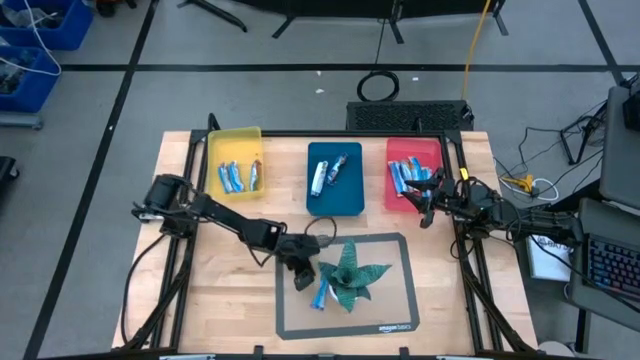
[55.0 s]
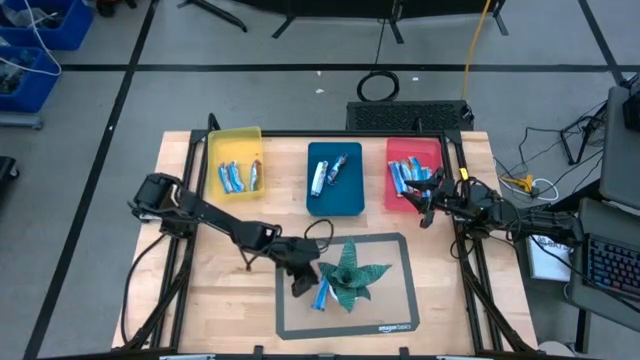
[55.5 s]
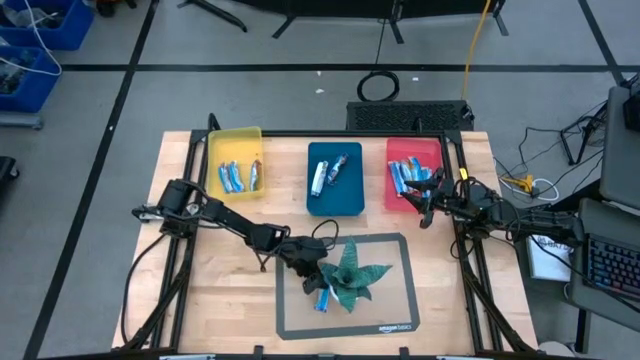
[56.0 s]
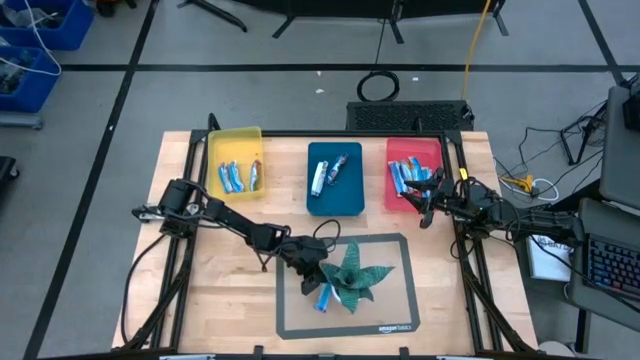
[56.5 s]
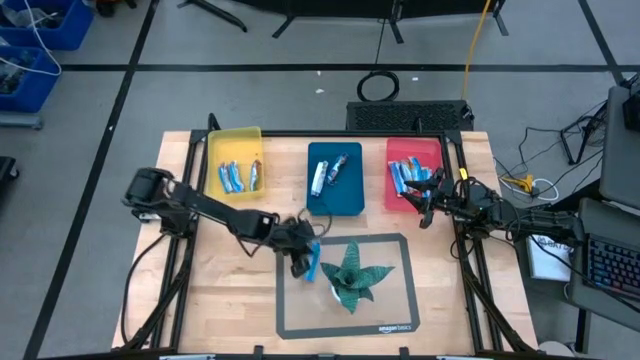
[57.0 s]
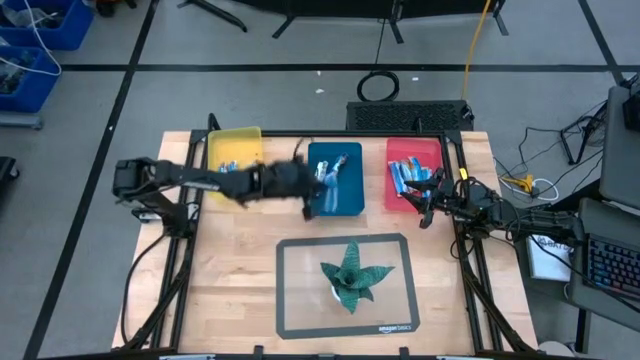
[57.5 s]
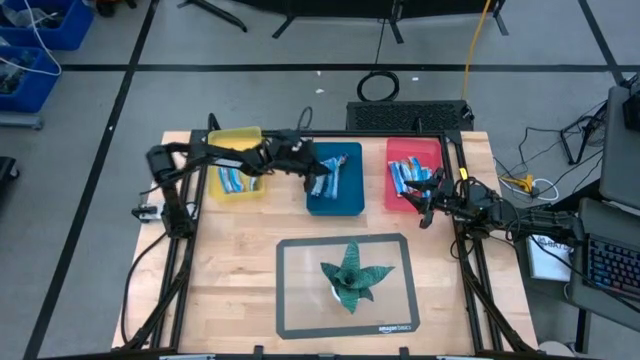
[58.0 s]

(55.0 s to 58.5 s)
Task: Pick and place Granola Bars by type
Put the blue granola bar into the blue bin

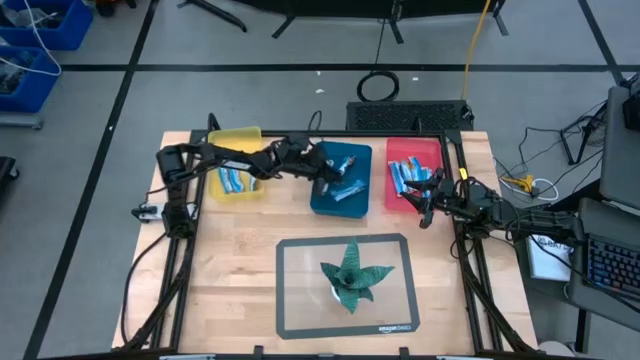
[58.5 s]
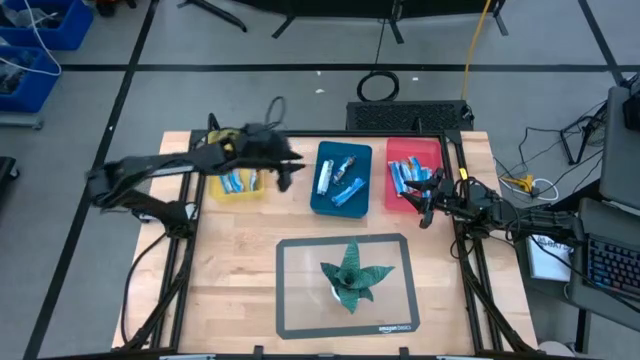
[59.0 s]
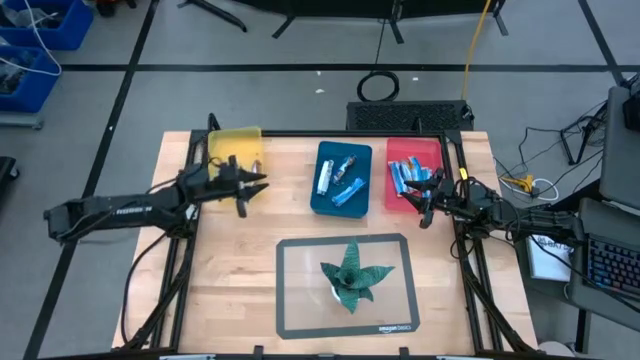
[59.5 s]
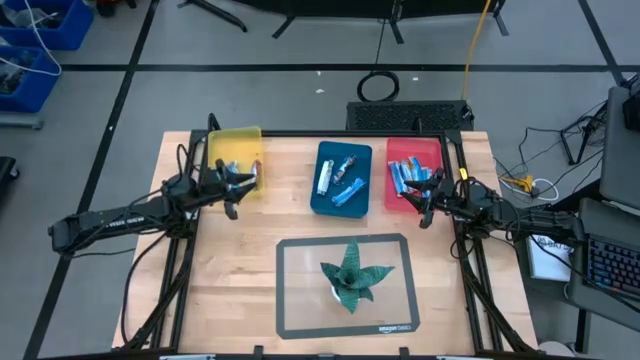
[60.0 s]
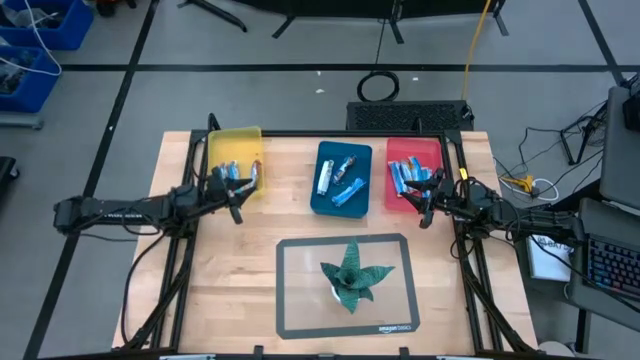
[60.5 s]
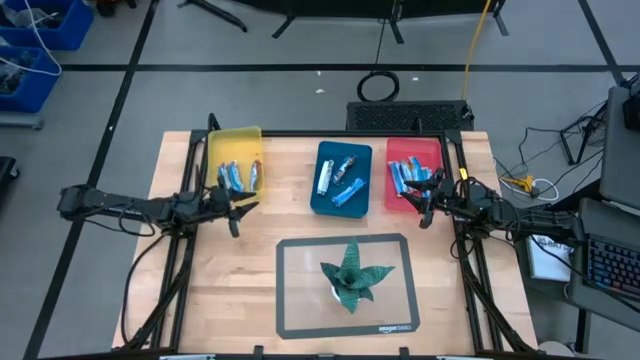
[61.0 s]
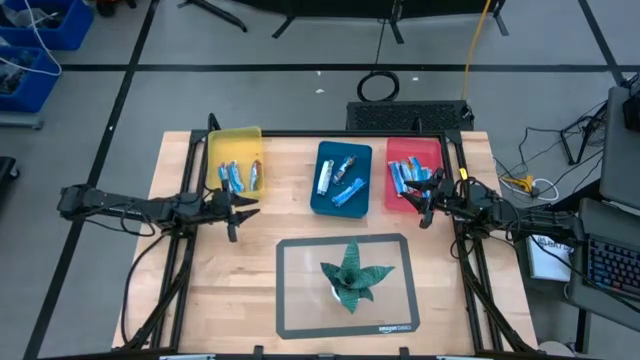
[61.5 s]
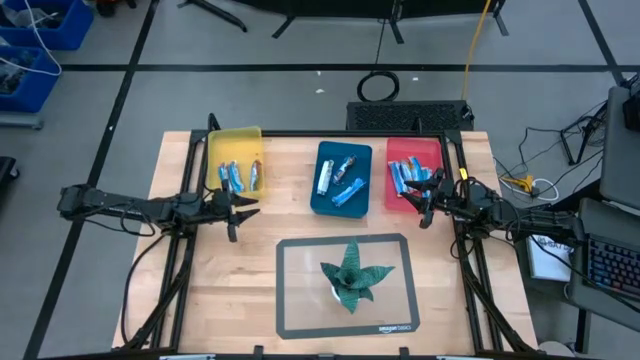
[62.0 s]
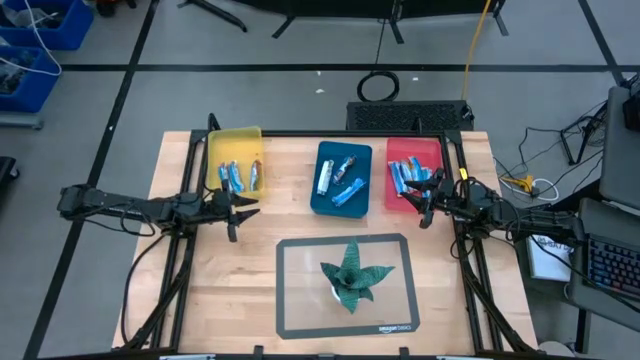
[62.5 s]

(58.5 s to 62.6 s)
Return to Home Position

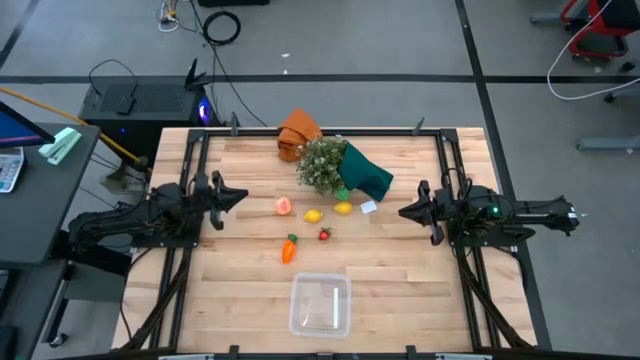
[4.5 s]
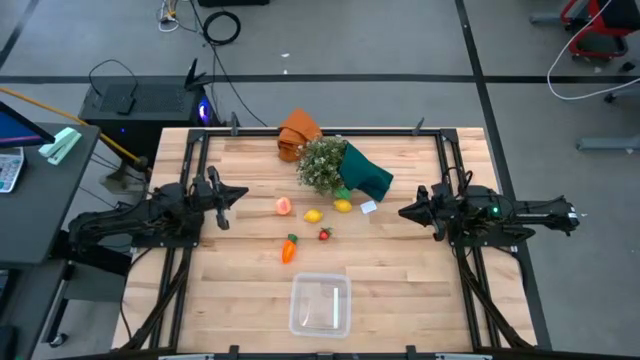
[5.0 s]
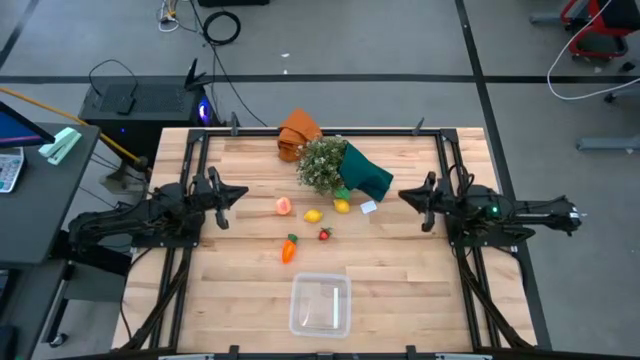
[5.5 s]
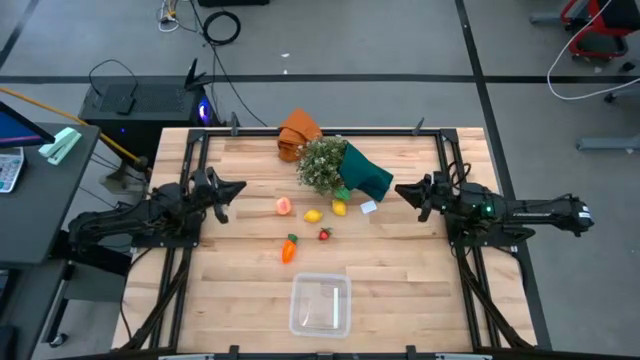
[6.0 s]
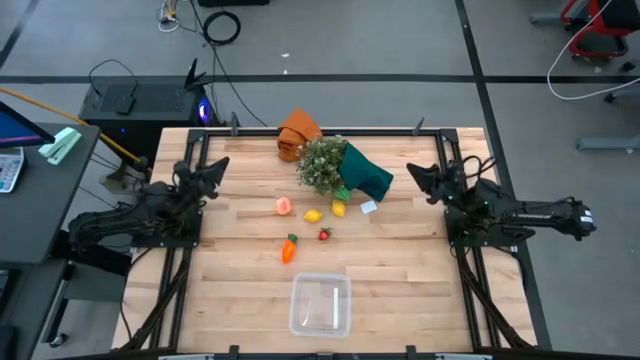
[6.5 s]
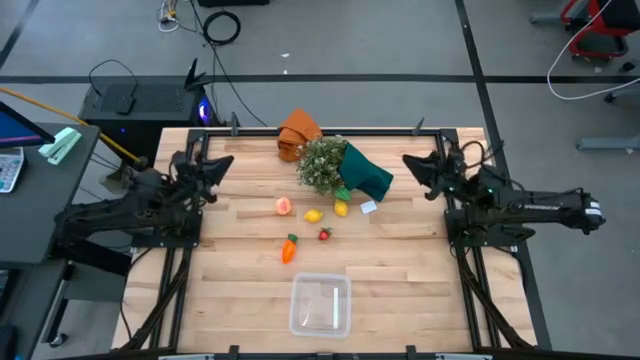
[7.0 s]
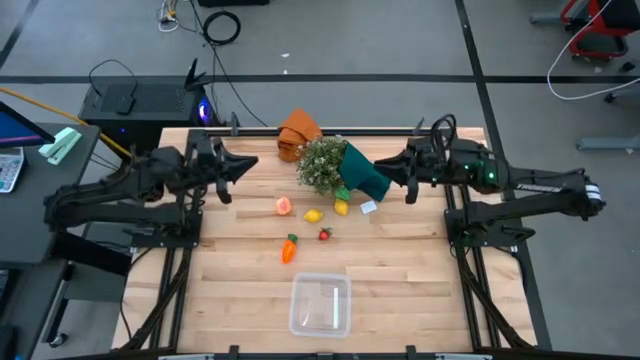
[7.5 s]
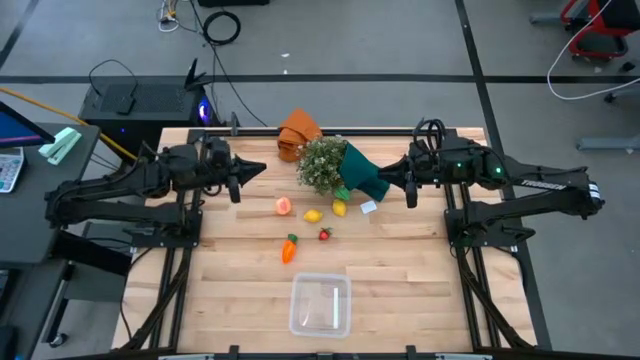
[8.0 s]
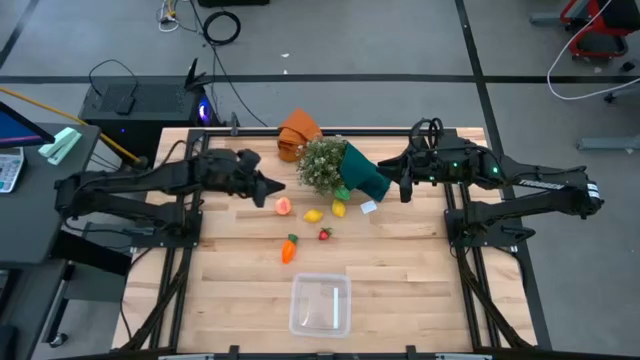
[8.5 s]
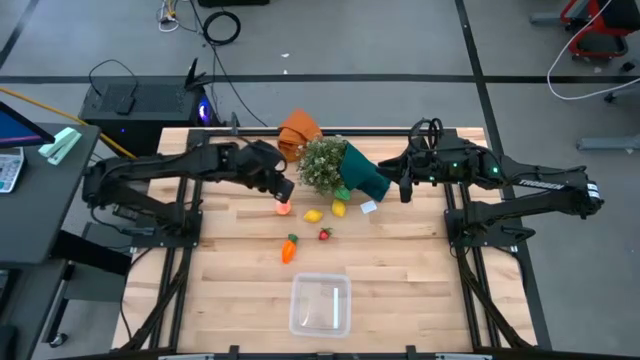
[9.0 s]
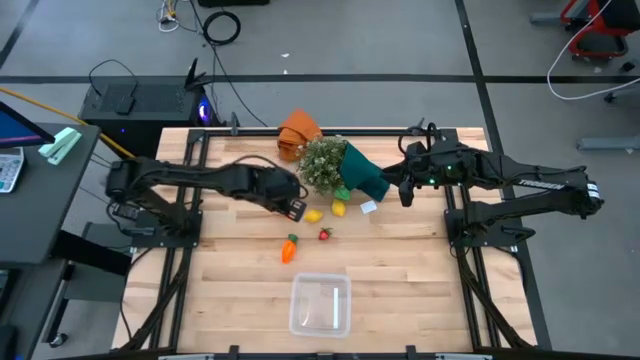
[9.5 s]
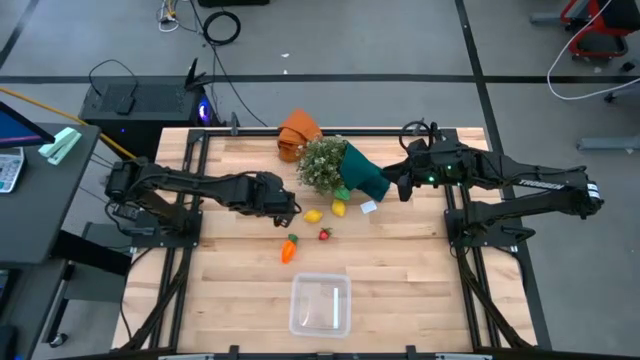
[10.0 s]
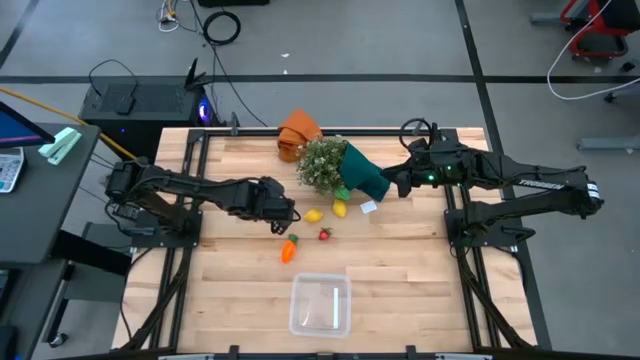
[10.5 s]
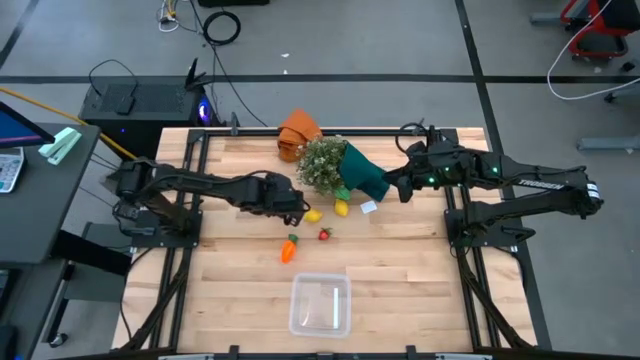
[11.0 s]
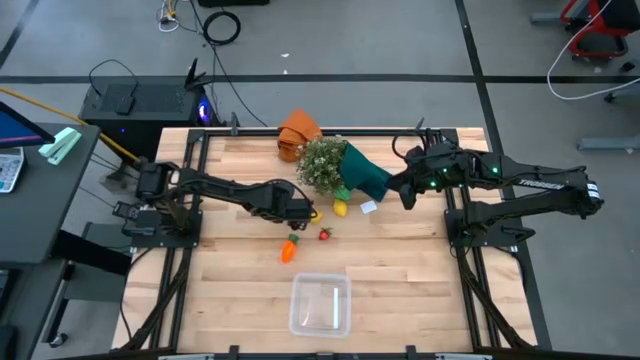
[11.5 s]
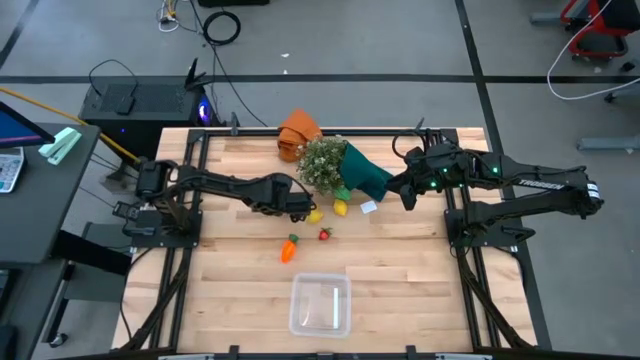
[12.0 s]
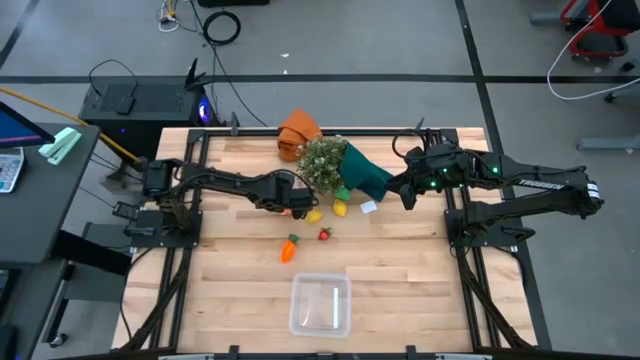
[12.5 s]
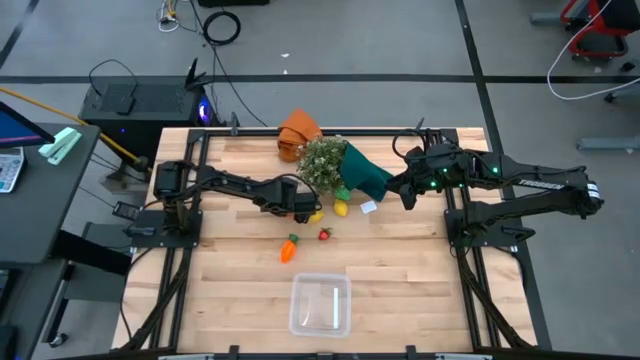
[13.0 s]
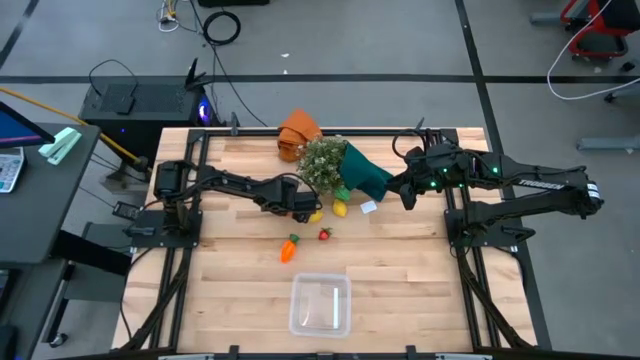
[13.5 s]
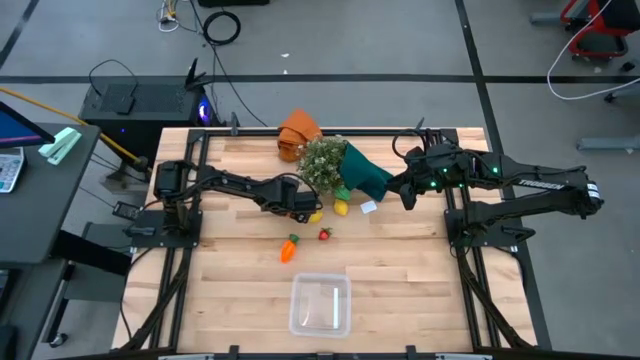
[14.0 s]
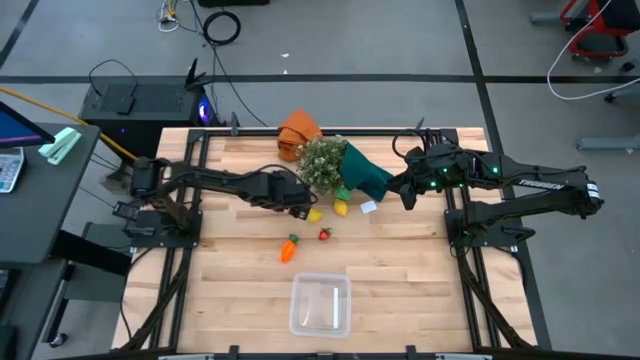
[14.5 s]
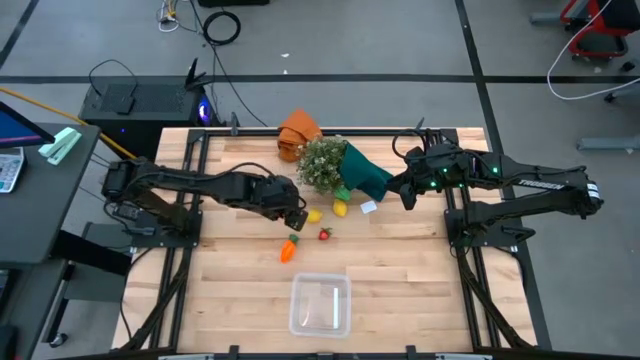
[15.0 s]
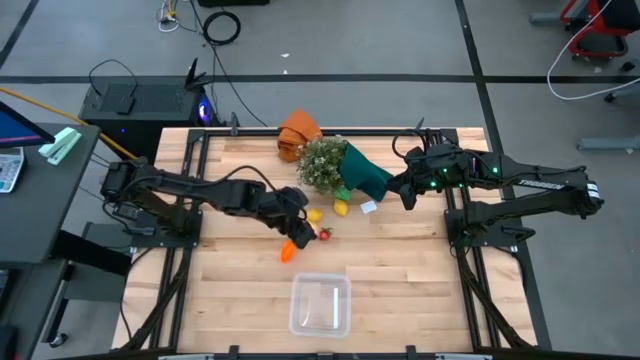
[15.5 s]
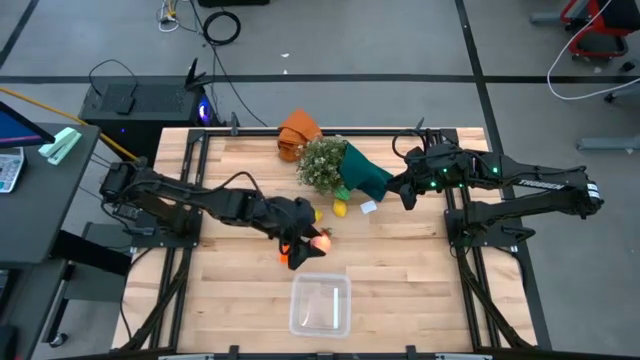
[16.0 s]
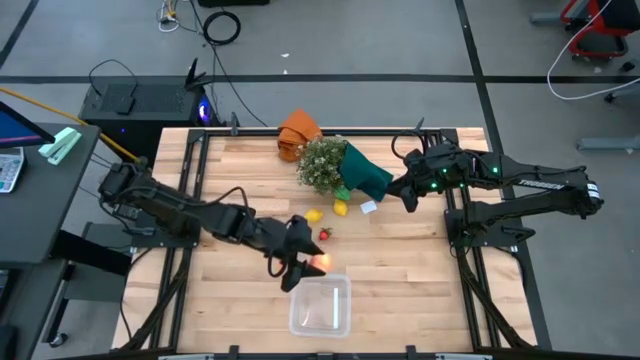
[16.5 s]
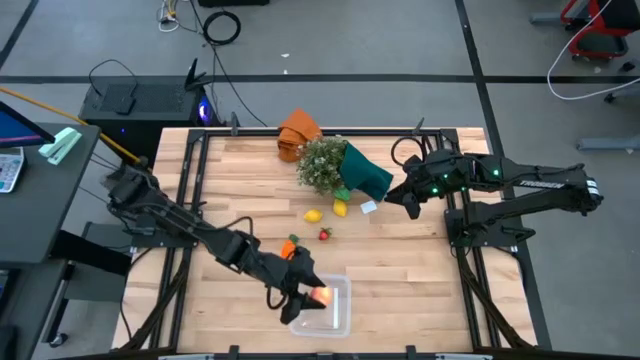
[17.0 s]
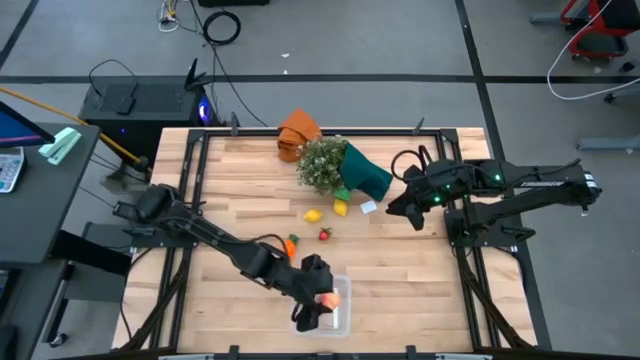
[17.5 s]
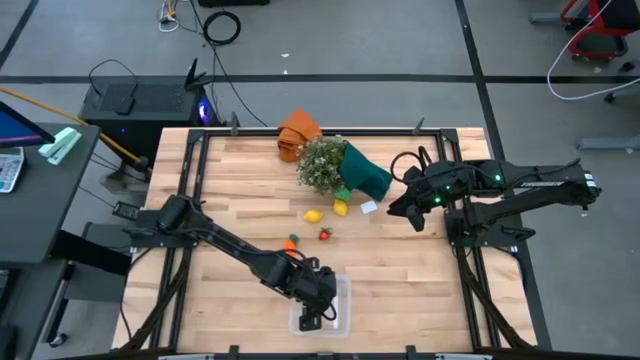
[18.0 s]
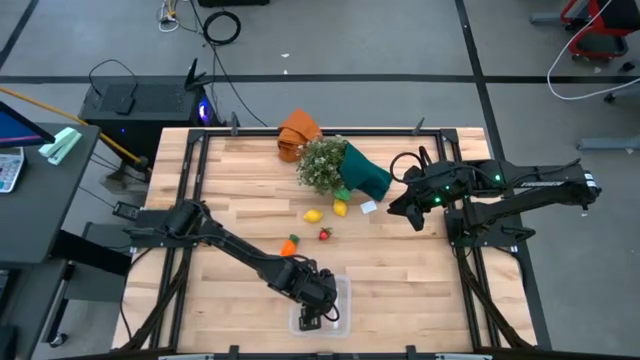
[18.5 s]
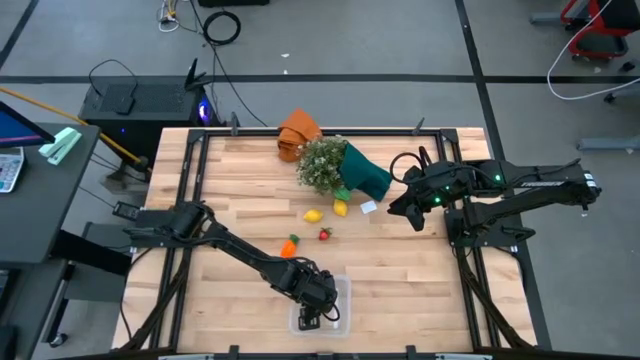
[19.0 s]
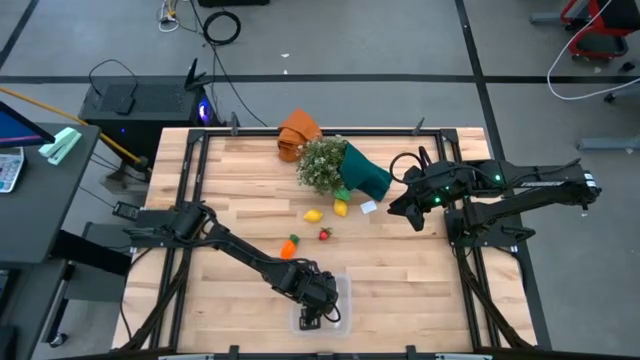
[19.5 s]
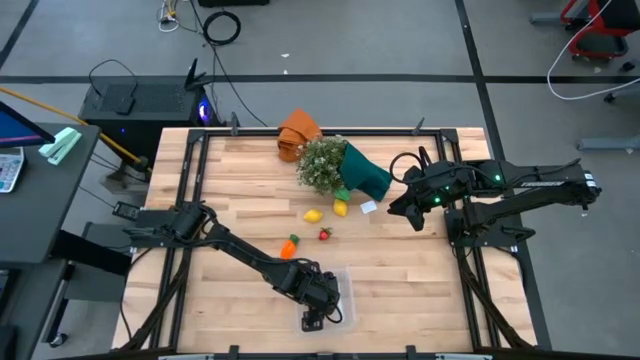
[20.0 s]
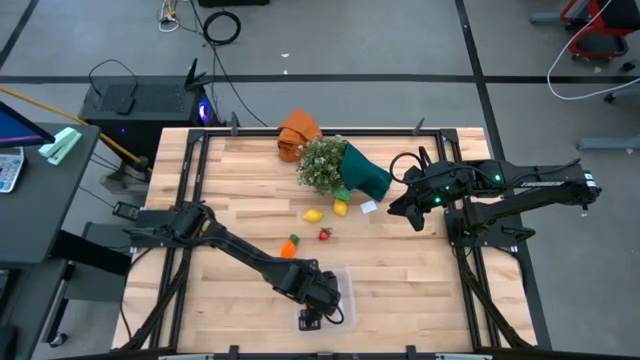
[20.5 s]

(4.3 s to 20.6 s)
Task: Pick and placing Produce into tupperware
Put the peach into the transparent container
